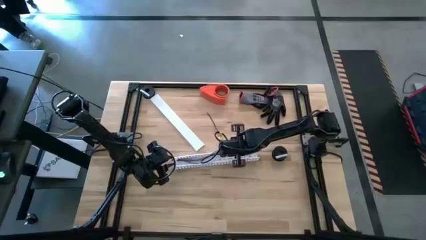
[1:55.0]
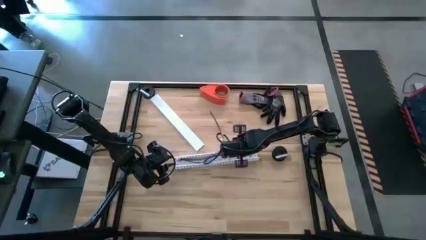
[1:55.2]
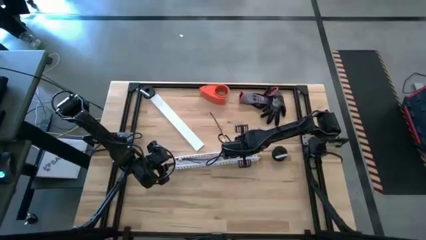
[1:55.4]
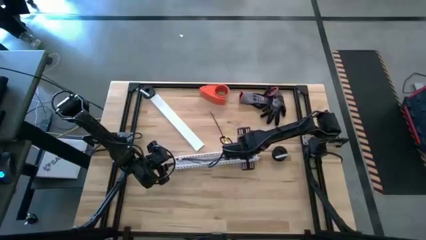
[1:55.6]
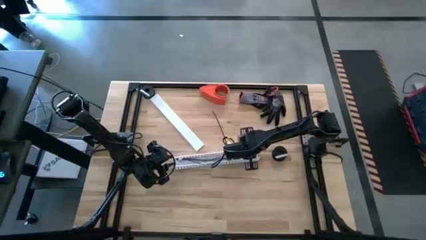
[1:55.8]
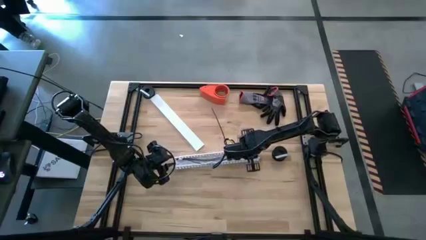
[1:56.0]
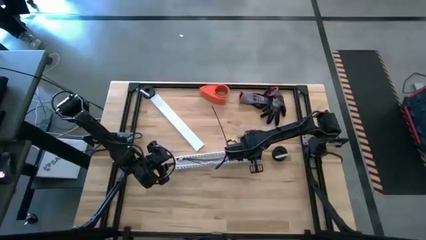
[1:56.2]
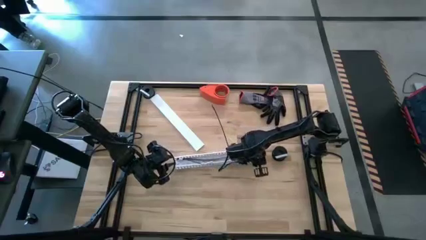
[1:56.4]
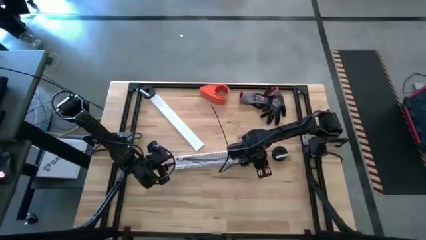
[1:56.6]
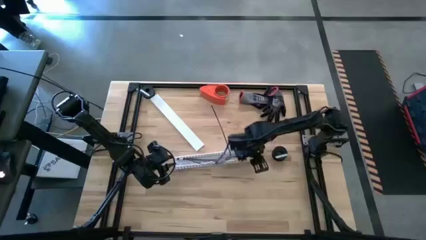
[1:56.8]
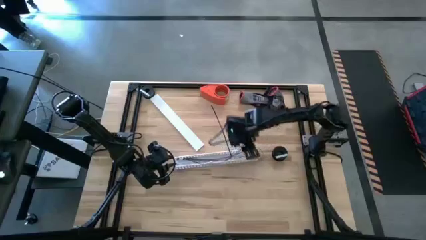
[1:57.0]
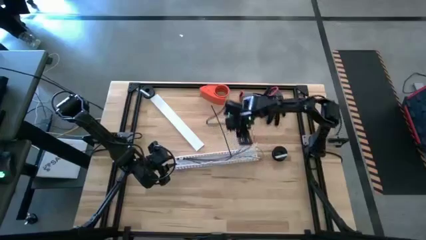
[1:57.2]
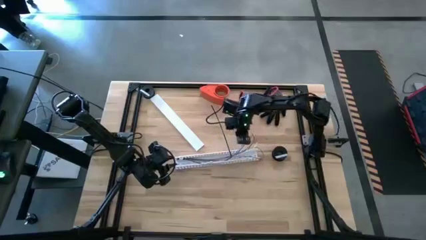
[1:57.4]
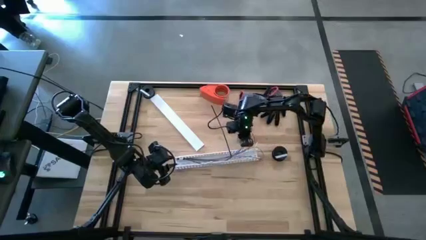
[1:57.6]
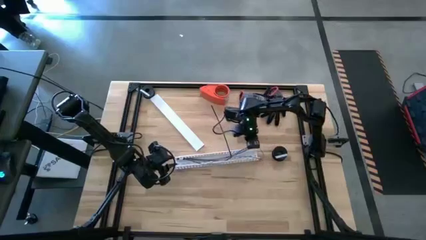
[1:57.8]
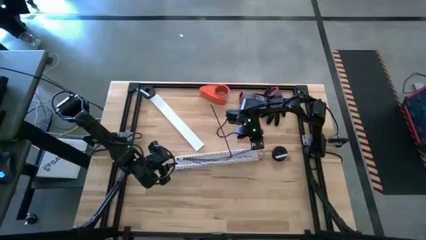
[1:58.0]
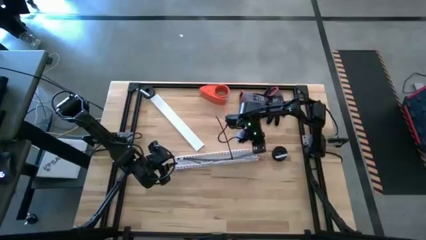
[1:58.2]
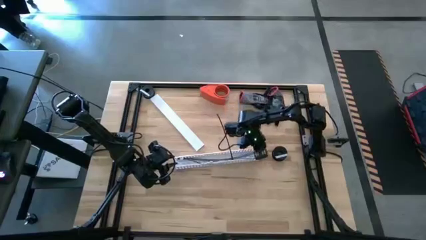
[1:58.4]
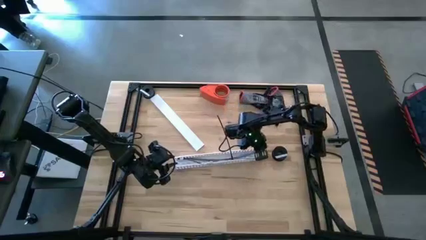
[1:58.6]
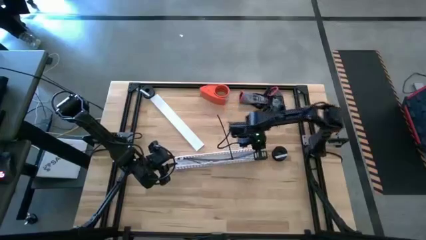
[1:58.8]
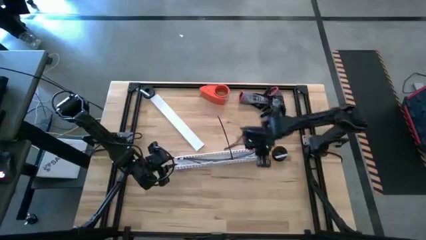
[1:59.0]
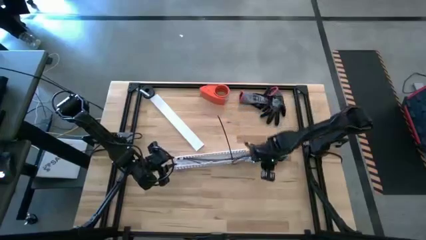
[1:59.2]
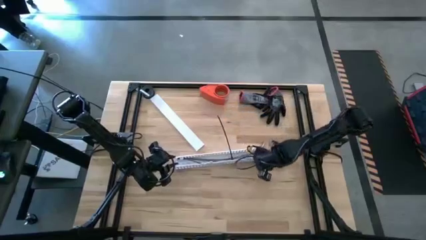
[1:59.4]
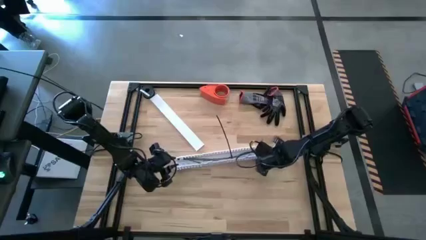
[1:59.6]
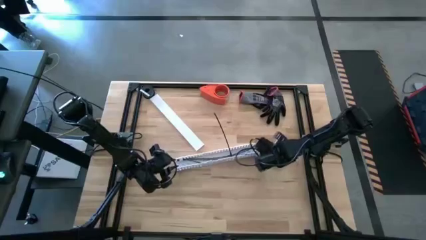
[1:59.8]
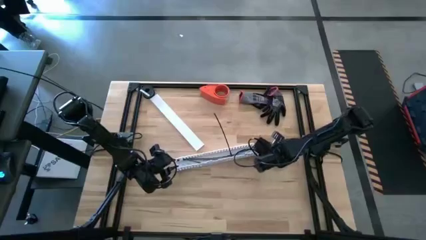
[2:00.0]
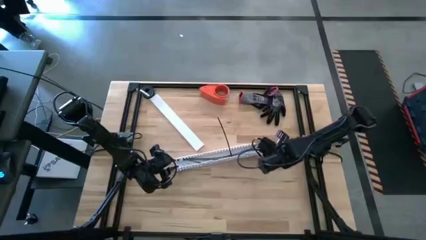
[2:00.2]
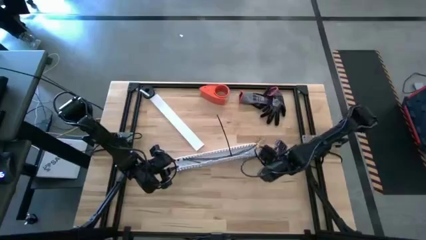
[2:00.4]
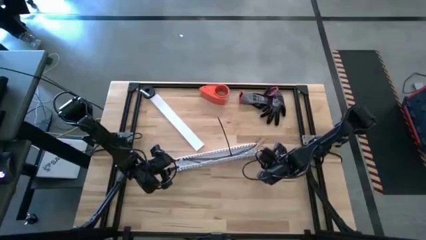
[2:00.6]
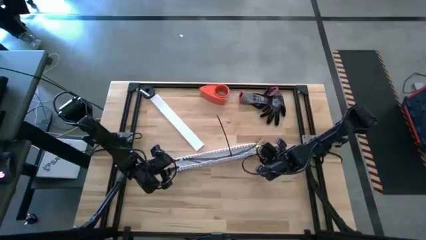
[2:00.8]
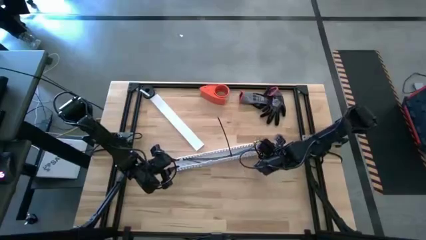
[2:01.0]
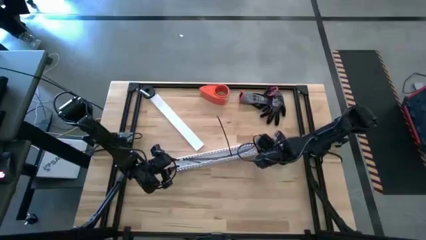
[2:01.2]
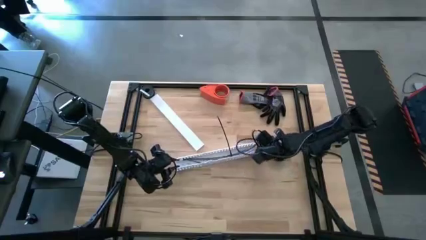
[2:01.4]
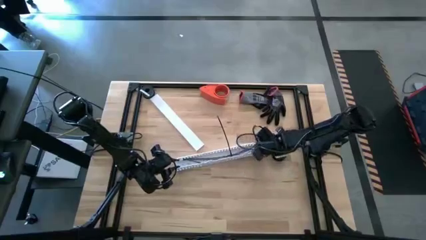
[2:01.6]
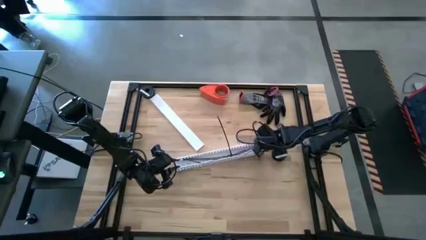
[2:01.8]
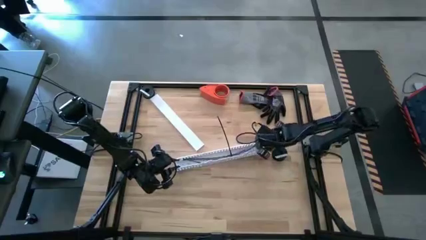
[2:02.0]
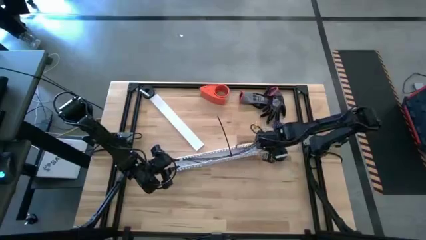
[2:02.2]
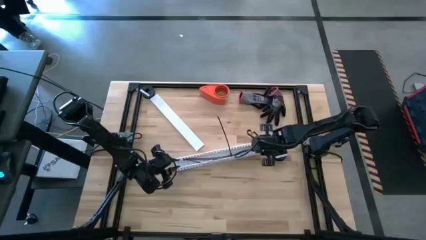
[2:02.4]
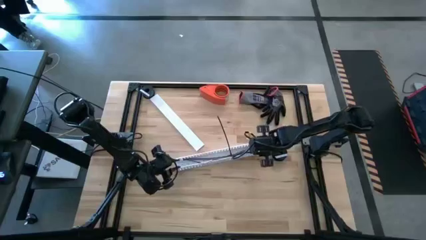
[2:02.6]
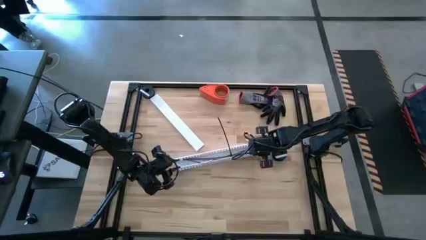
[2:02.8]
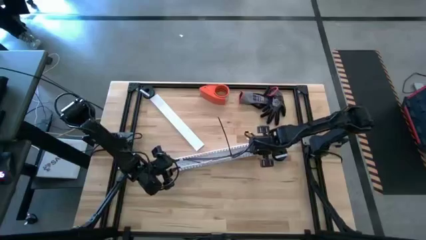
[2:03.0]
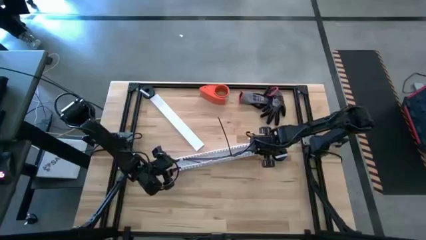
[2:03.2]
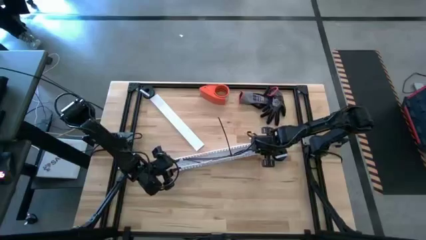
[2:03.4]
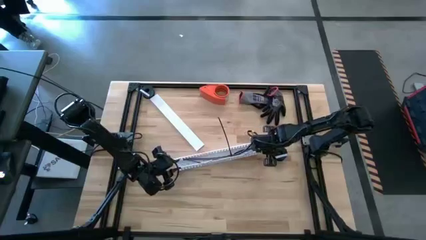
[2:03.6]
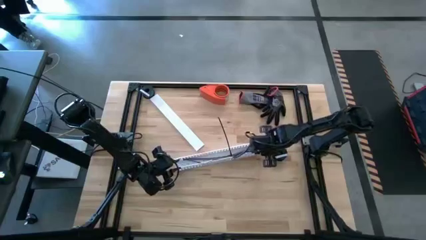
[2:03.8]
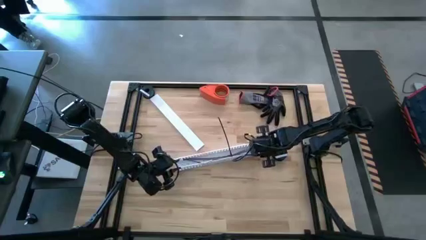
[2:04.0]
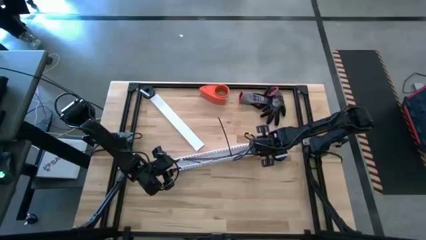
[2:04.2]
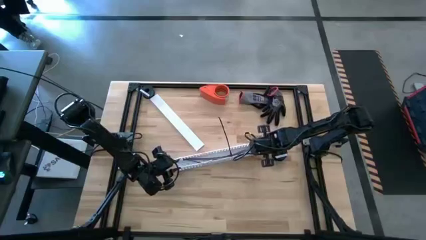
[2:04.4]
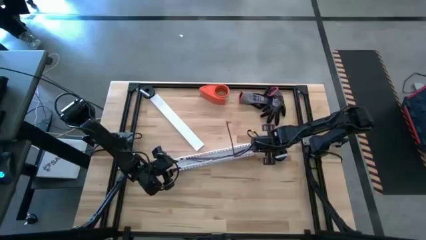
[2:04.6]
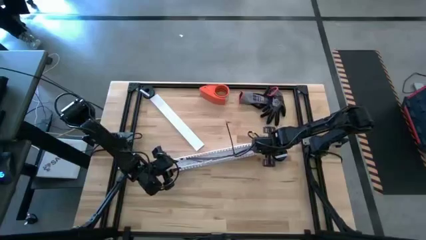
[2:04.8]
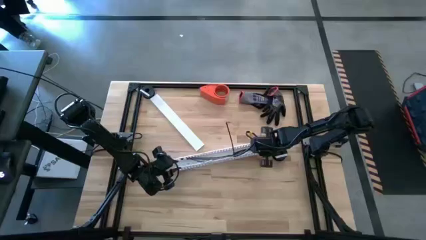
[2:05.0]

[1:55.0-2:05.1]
Task: Ziptie cables
Put the black cables zip-tied cables into the white cable duct
